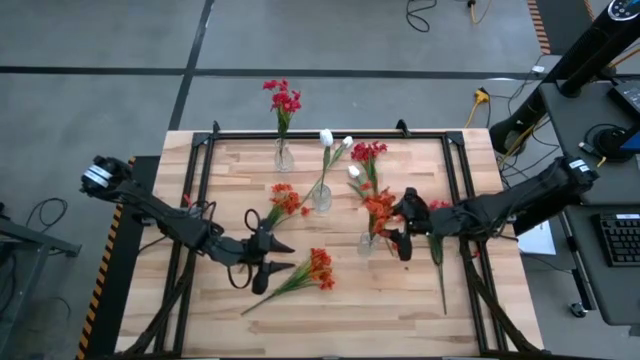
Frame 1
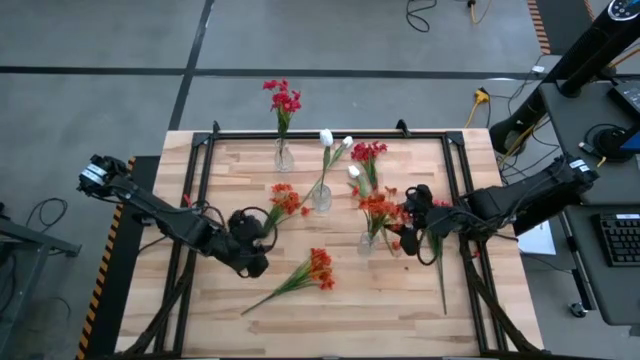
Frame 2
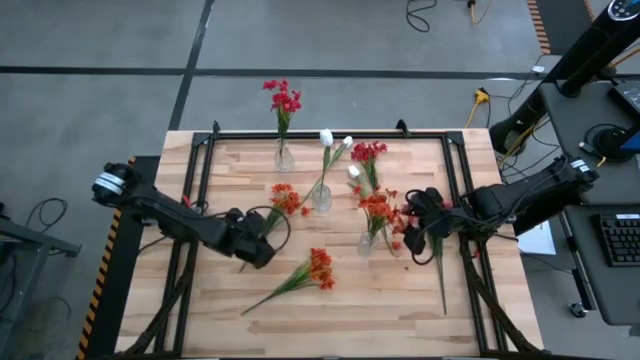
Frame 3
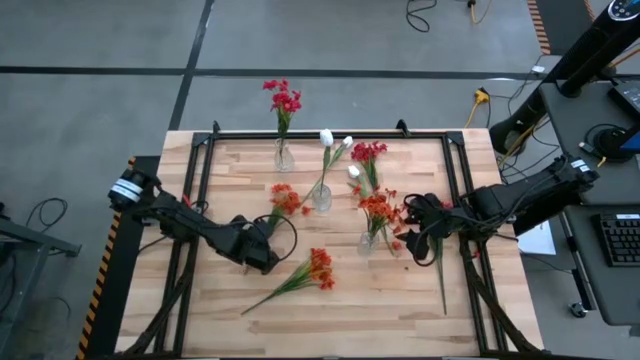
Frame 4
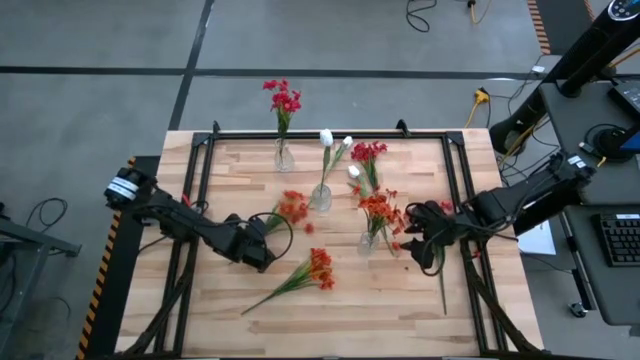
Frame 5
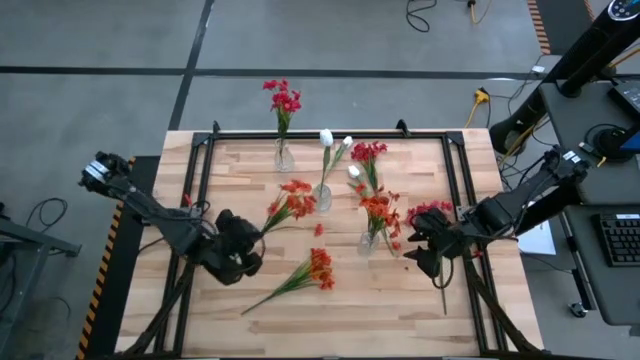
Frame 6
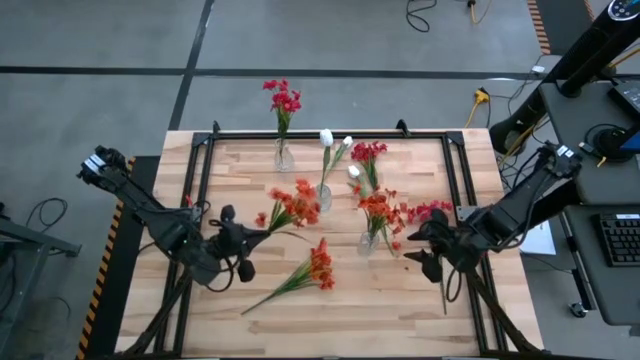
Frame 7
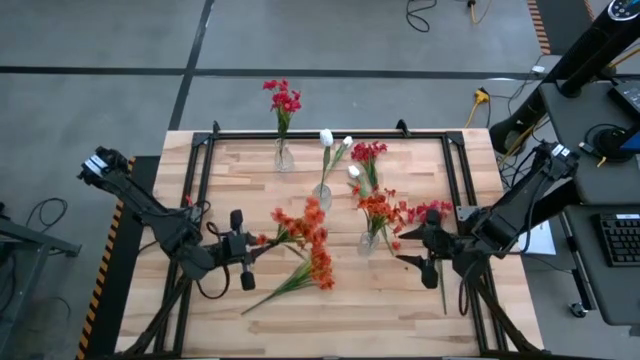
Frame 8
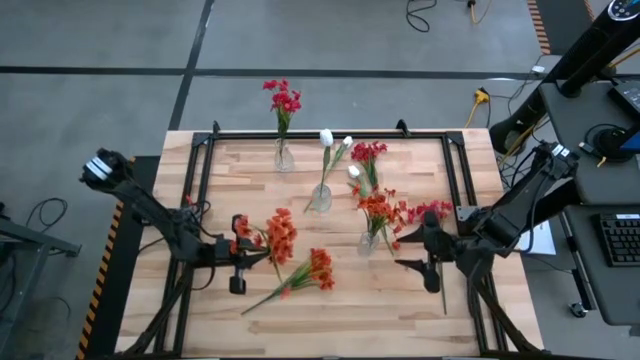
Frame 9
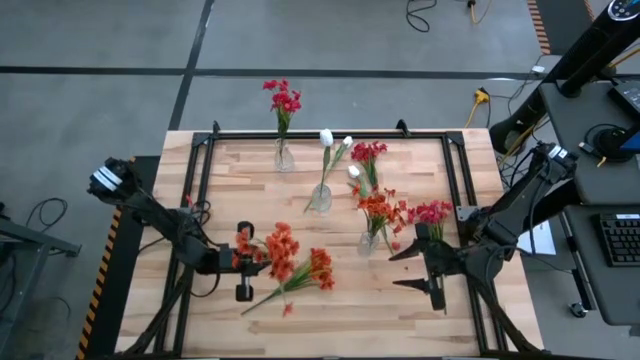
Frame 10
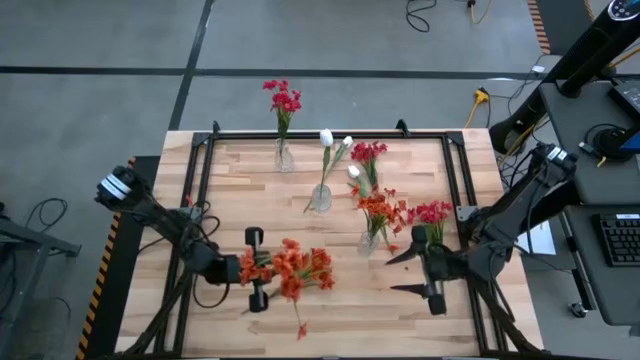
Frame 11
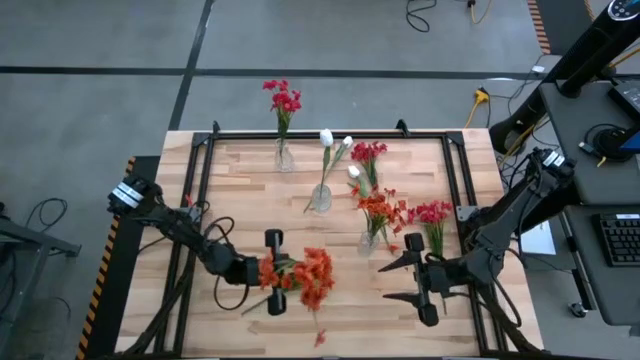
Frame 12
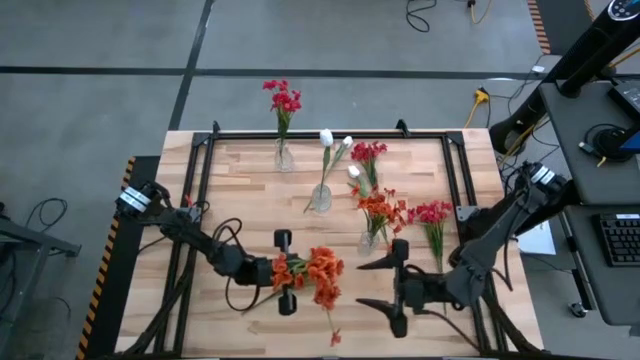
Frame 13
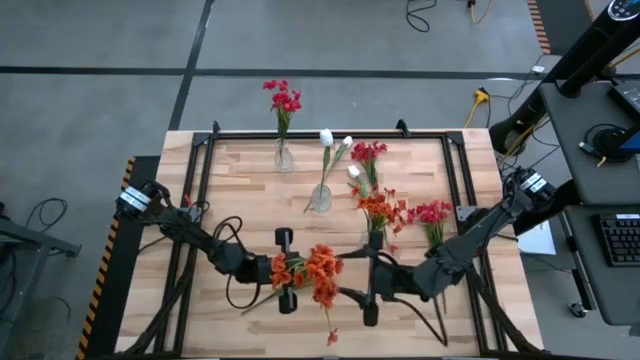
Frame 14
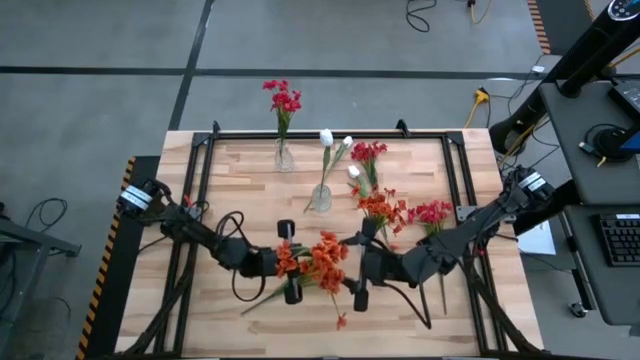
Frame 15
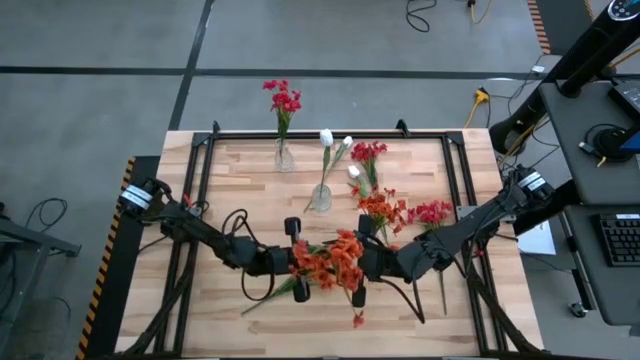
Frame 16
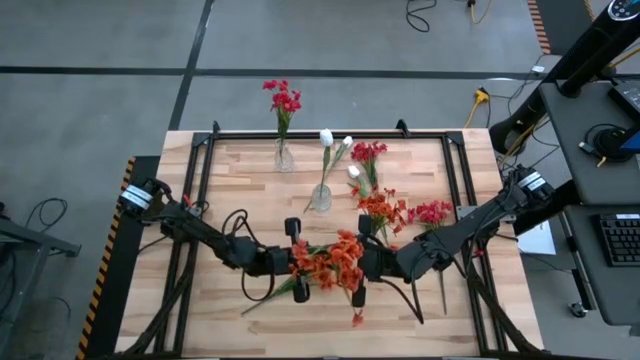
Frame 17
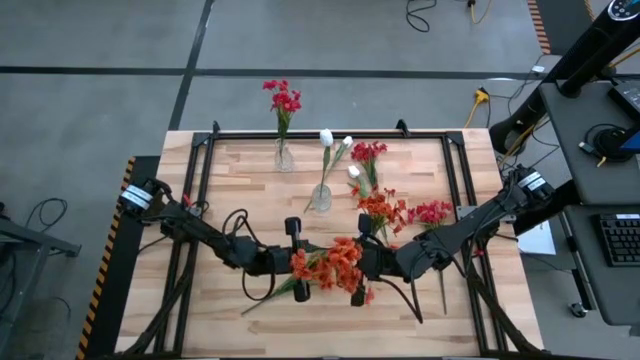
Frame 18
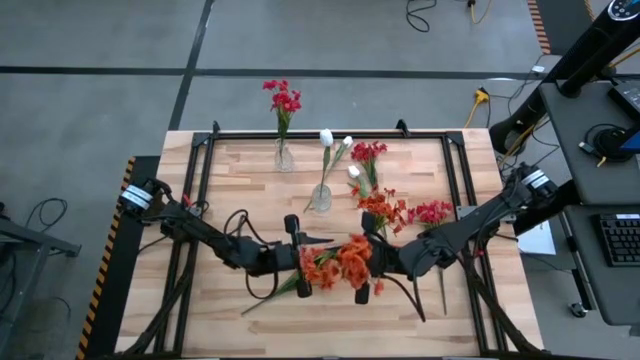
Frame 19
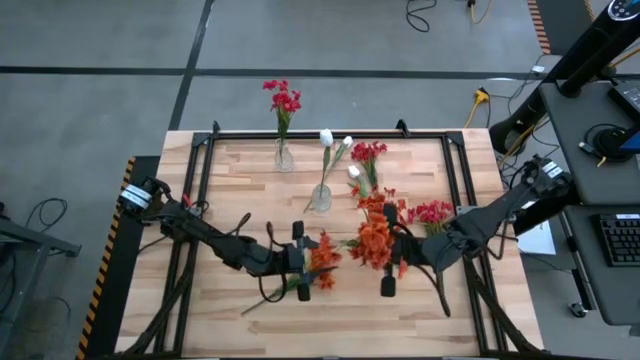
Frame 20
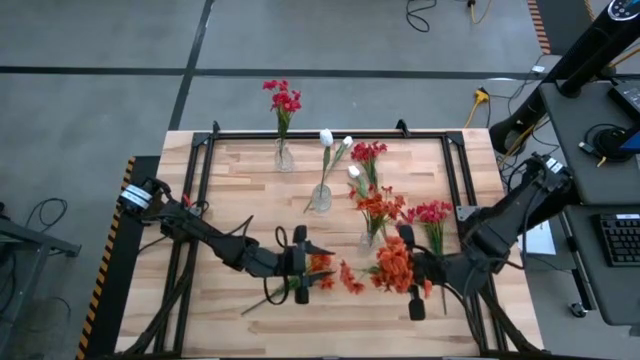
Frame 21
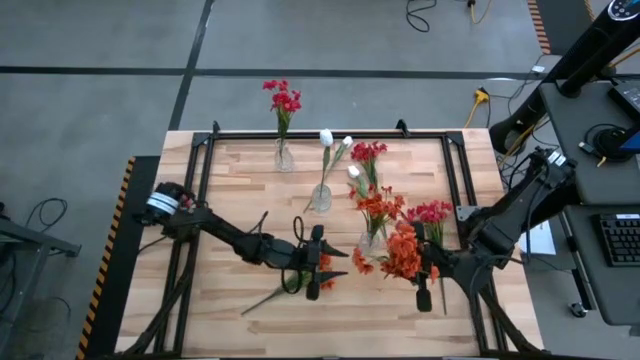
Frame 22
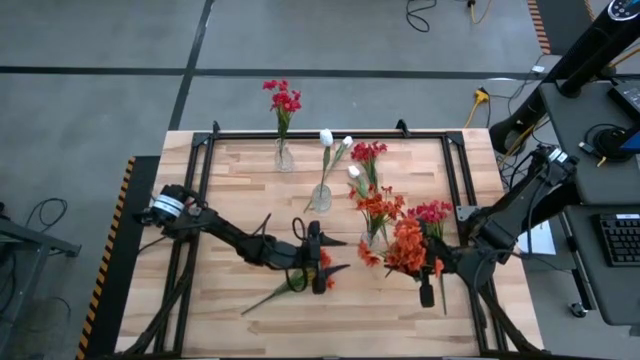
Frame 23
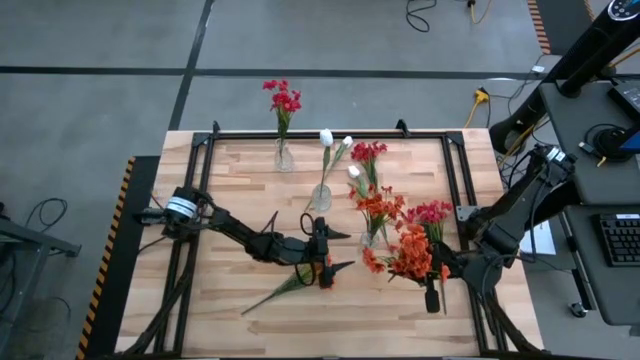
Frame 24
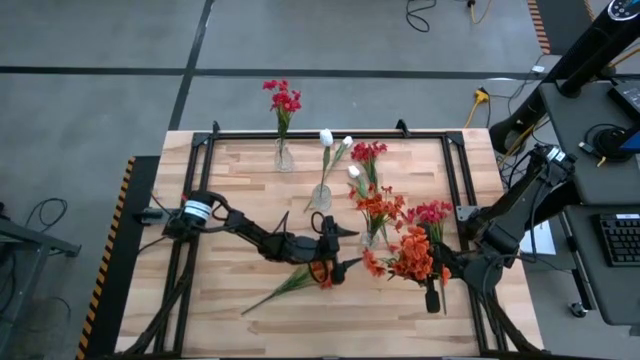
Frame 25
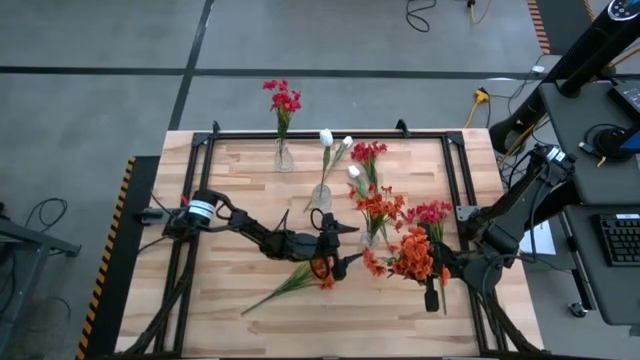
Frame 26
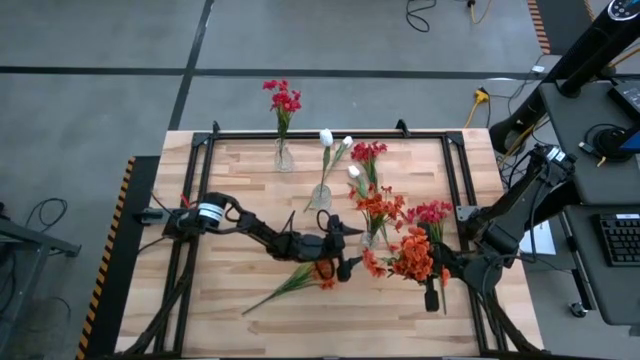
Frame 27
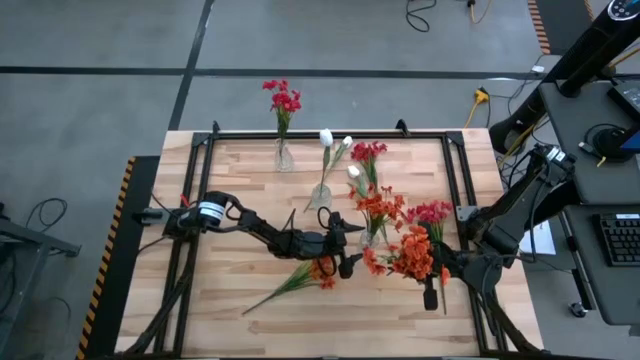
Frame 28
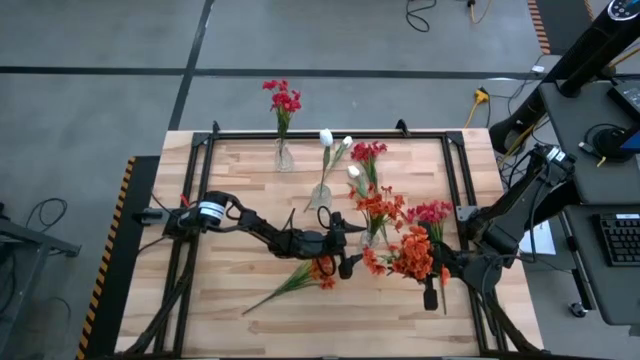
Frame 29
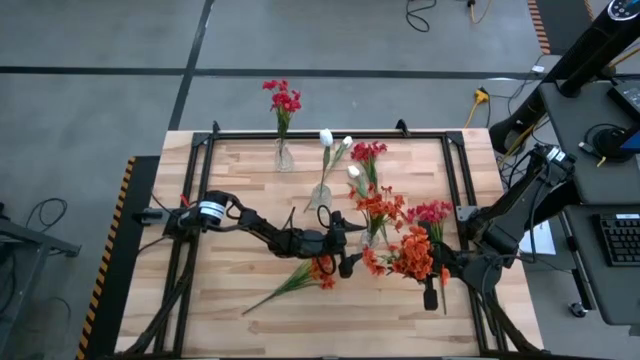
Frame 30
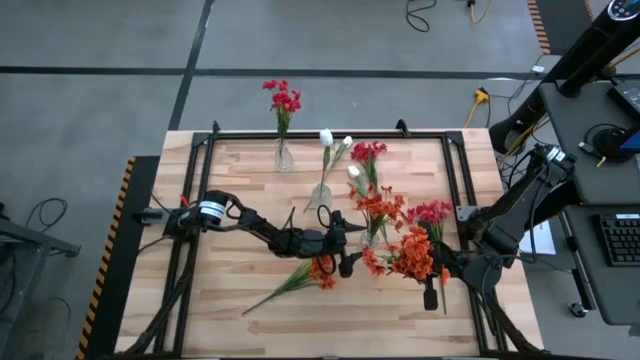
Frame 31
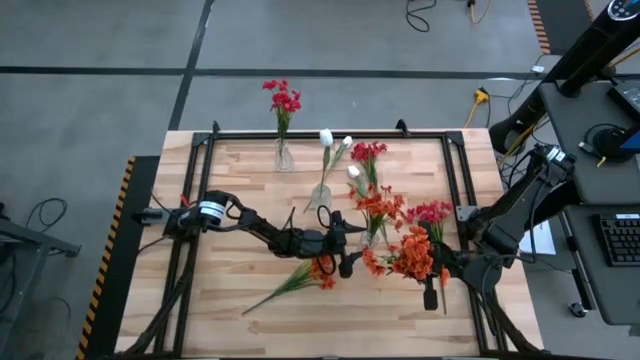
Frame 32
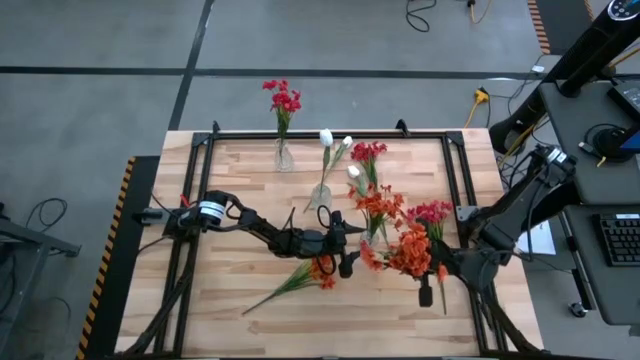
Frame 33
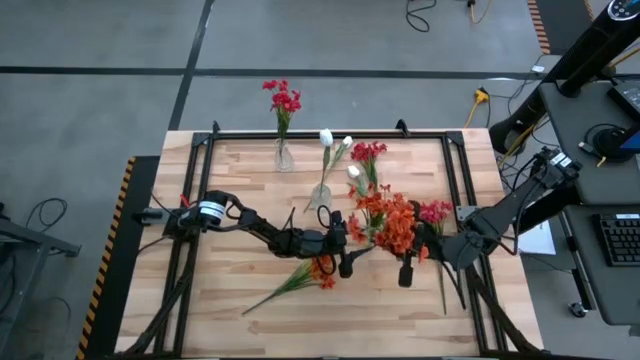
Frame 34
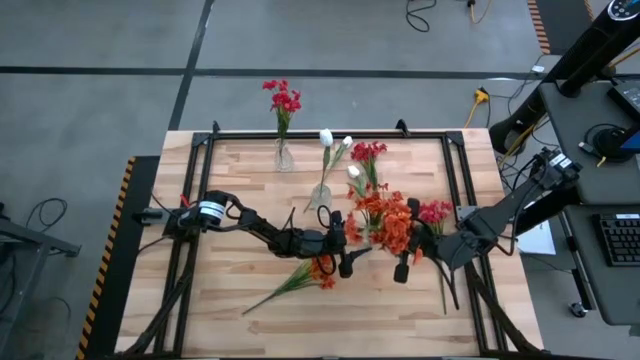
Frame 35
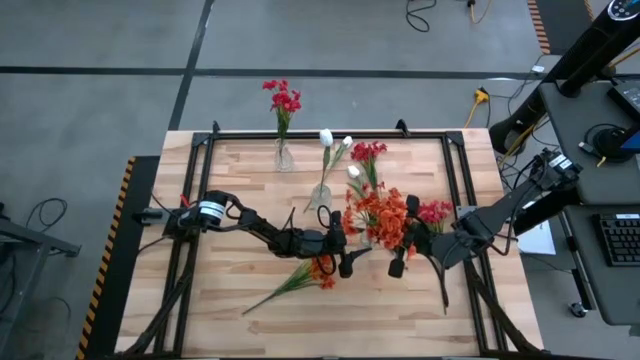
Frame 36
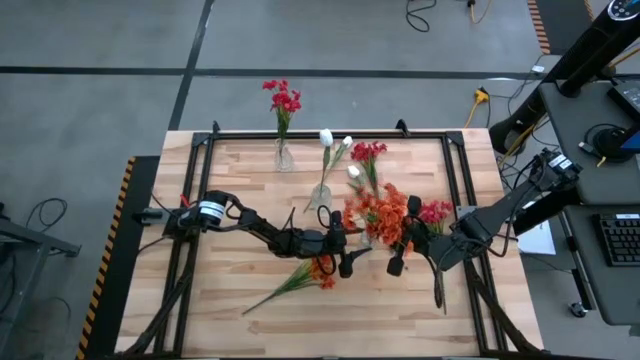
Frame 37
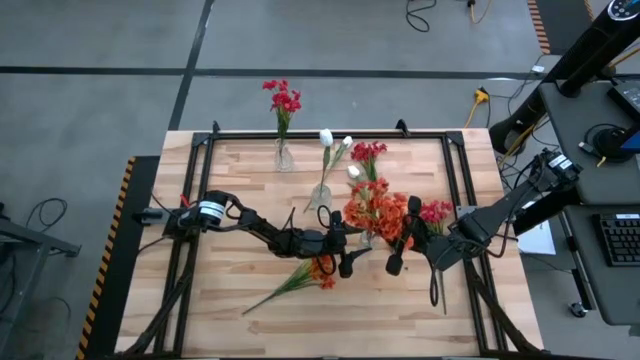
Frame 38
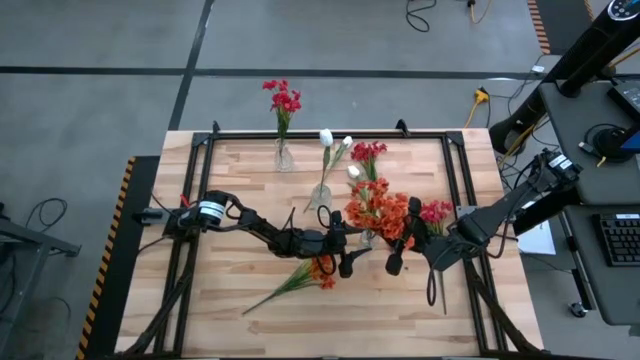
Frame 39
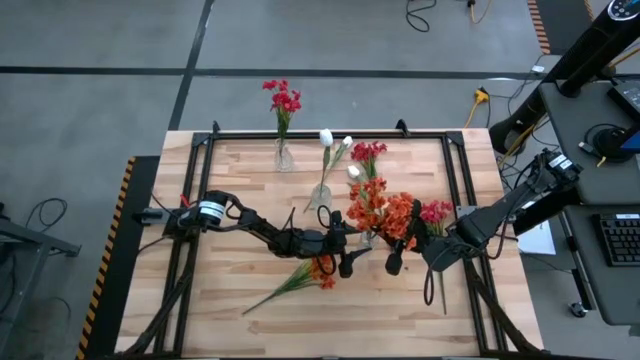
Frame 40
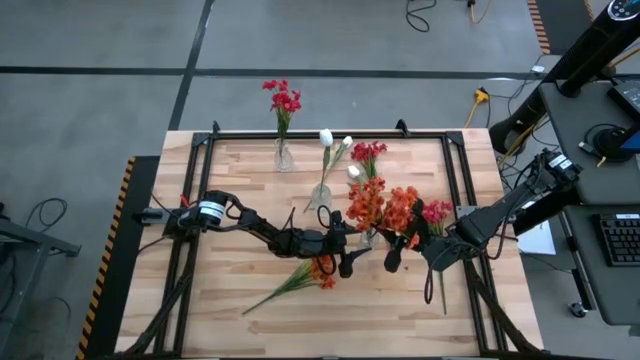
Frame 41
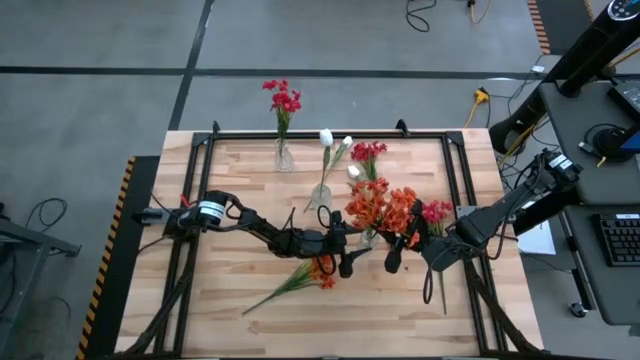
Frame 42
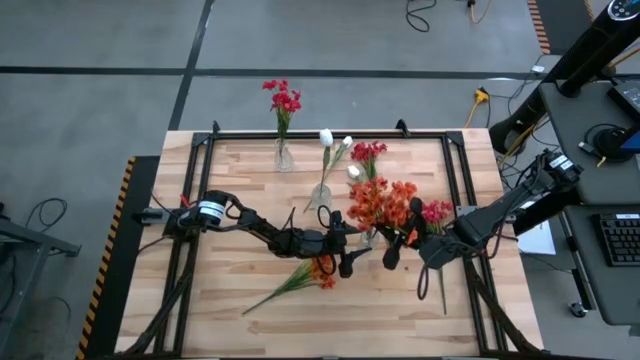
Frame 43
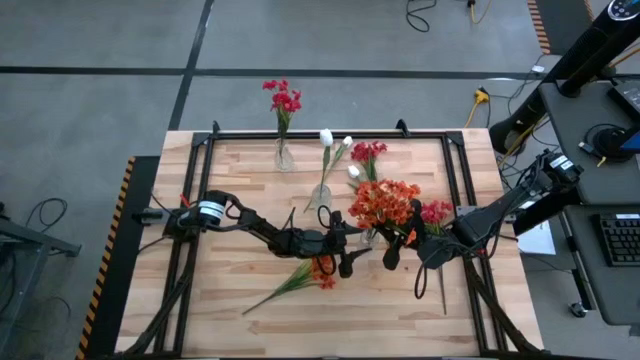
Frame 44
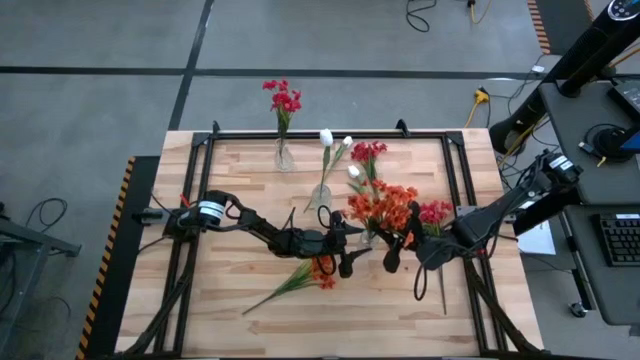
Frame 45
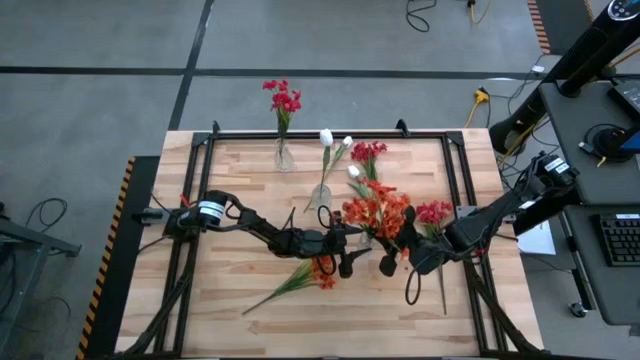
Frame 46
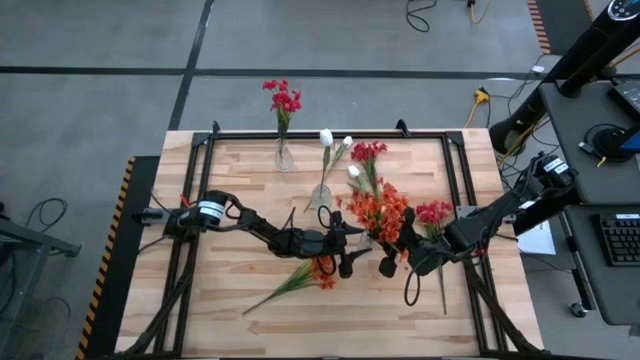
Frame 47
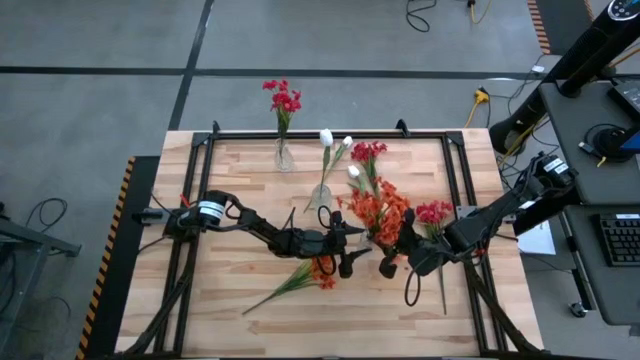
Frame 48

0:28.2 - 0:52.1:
Task: Sort flowers into vase by color
Put the middle left orange sprig flower into the bottom right transparent glass vase
